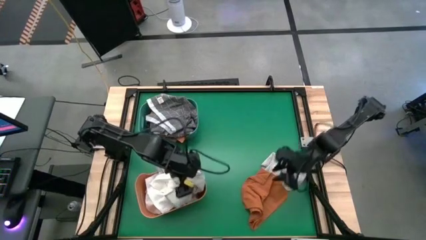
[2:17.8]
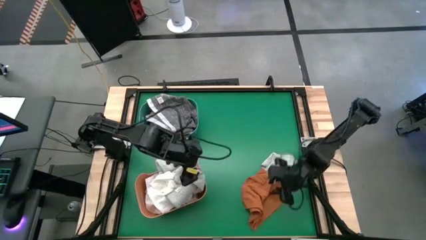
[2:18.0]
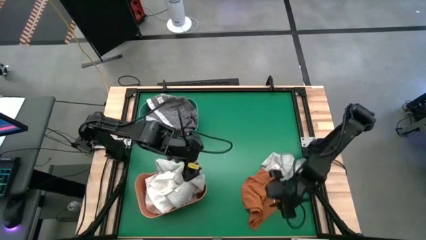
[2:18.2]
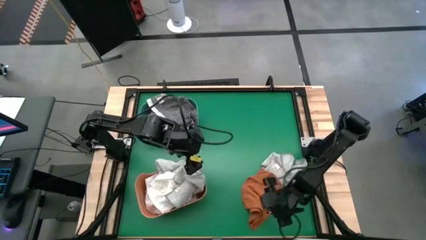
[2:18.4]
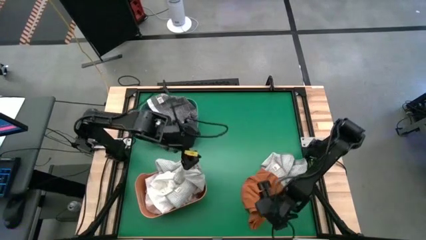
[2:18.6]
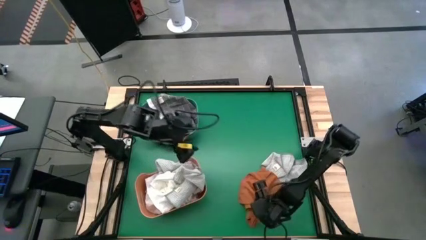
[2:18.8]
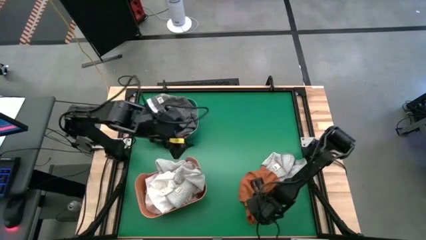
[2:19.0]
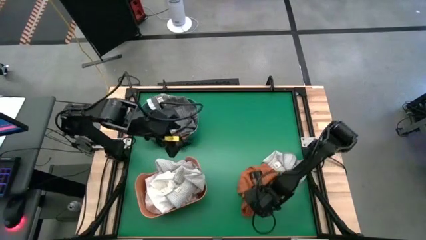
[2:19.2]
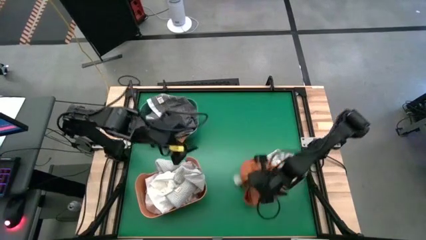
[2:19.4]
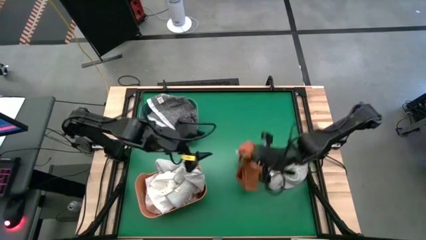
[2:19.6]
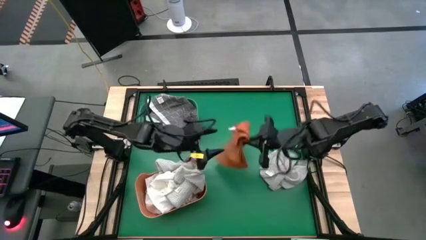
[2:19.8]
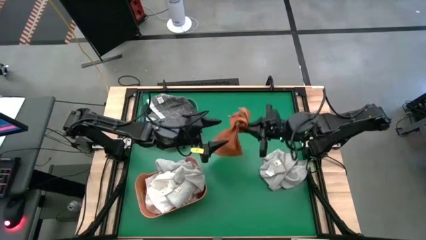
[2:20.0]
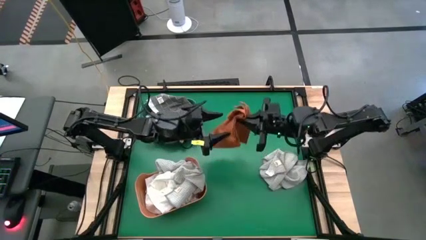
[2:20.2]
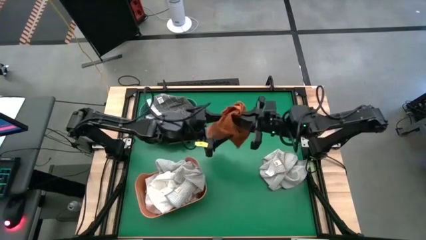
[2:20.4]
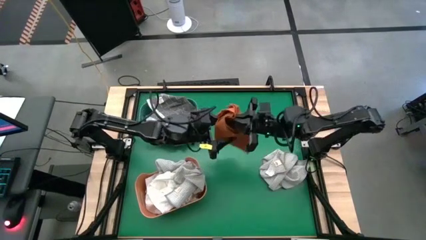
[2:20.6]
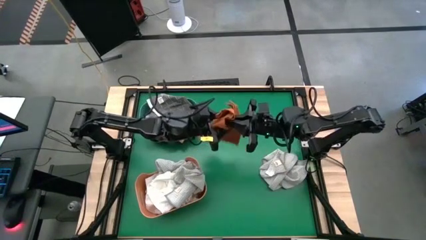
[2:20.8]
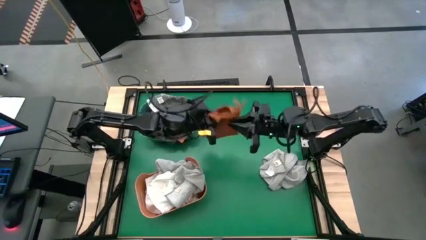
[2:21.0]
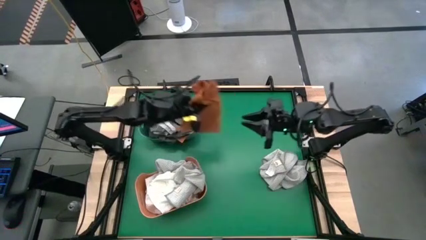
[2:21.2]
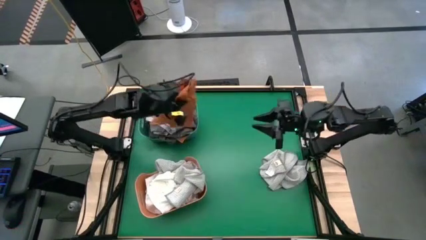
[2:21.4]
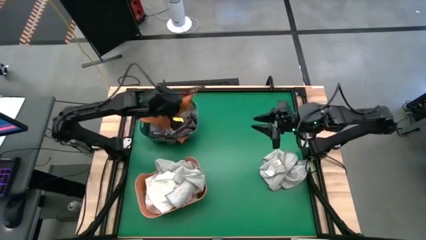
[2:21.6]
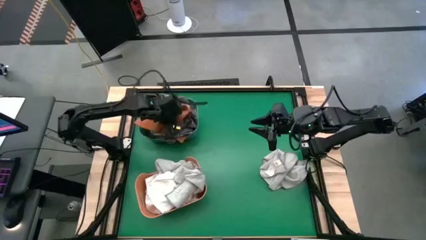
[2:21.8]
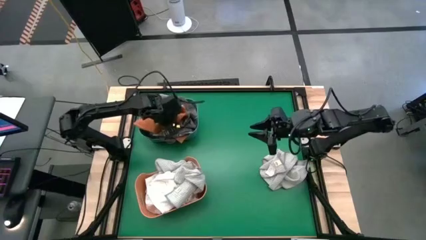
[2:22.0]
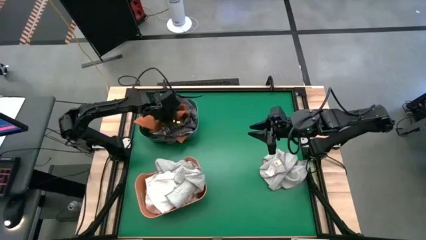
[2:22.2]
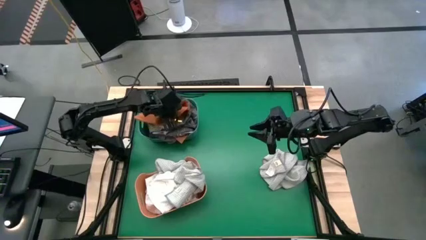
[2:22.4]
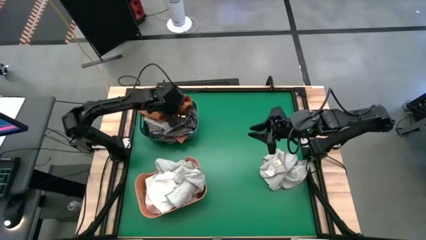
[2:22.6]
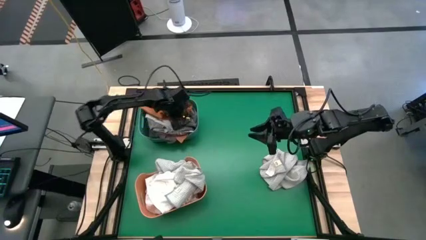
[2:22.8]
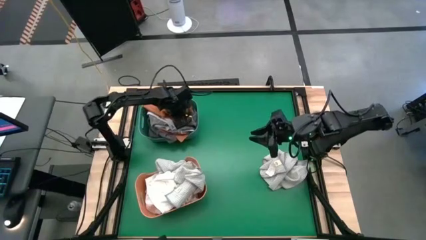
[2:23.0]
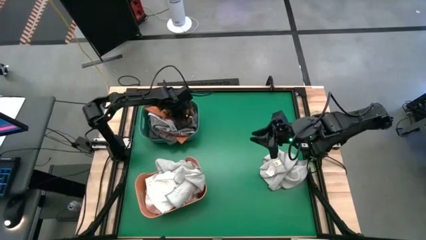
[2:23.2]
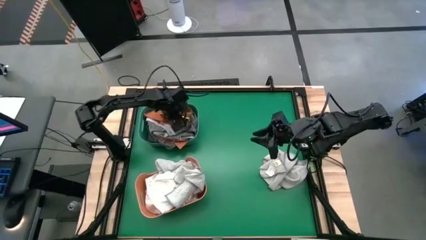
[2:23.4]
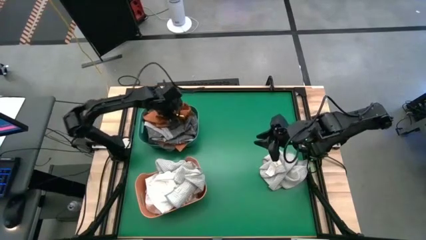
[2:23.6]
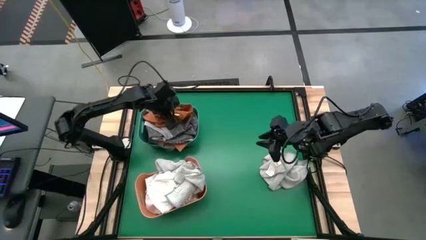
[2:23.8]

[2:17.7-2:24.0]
Task: Sort microfiber towel by color & place in baskets
Put the orange microfiber towel into the green bin

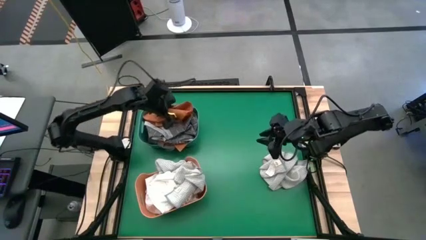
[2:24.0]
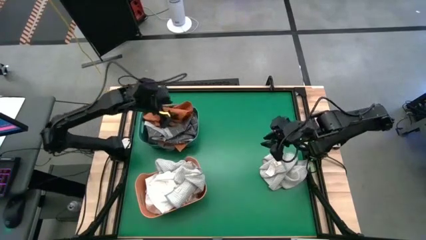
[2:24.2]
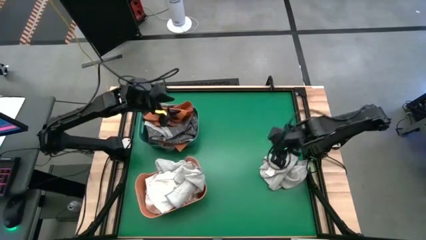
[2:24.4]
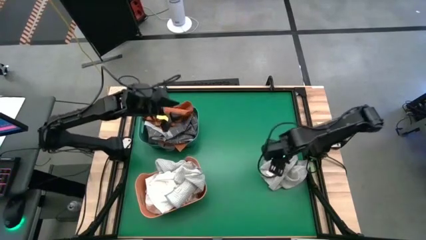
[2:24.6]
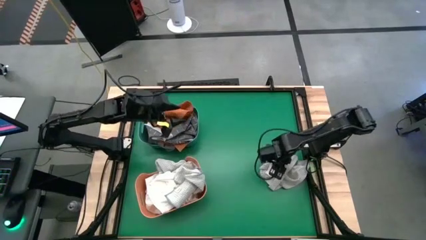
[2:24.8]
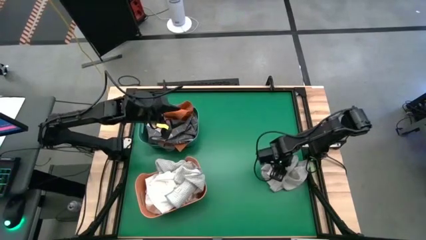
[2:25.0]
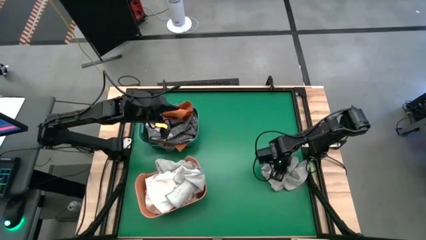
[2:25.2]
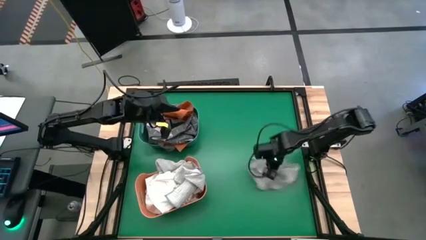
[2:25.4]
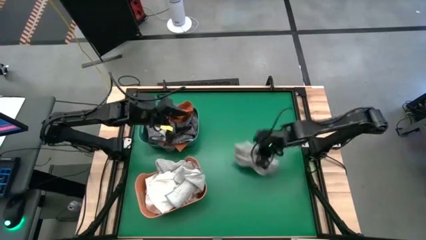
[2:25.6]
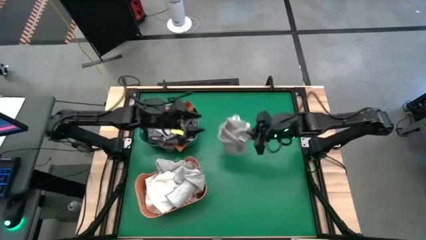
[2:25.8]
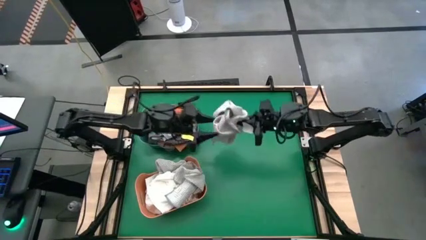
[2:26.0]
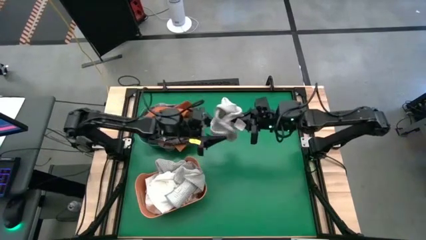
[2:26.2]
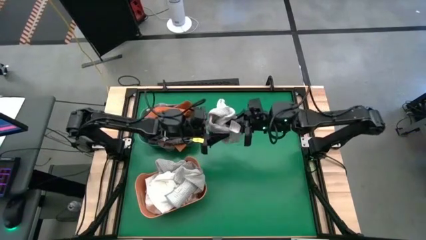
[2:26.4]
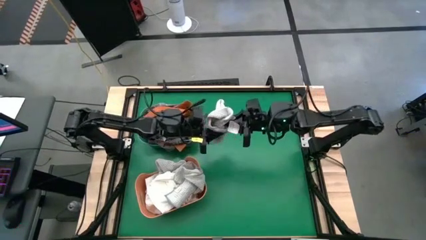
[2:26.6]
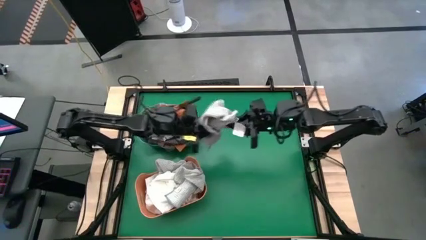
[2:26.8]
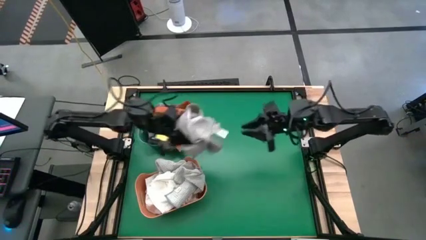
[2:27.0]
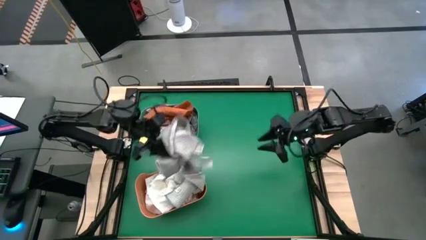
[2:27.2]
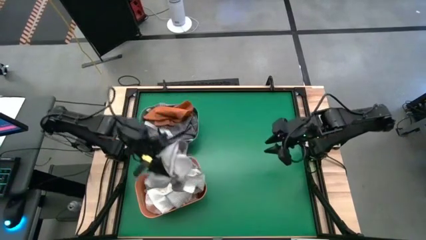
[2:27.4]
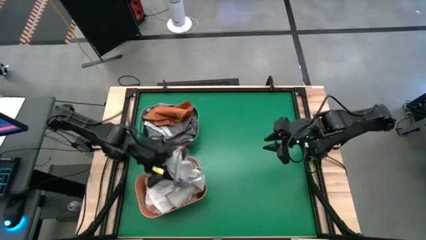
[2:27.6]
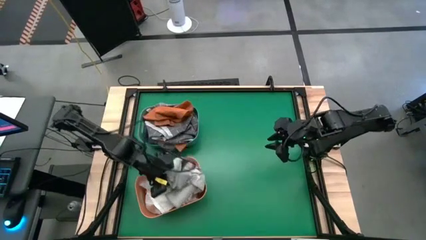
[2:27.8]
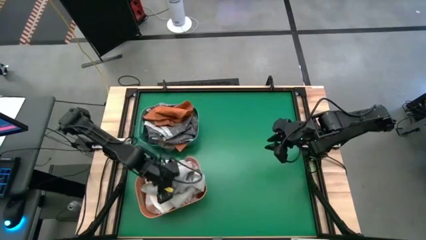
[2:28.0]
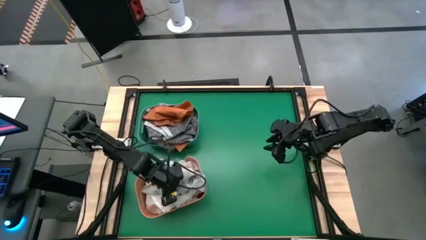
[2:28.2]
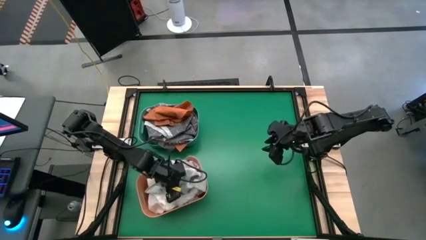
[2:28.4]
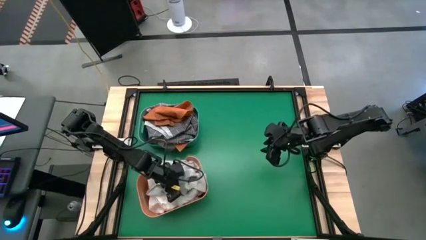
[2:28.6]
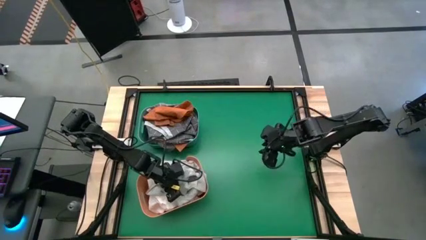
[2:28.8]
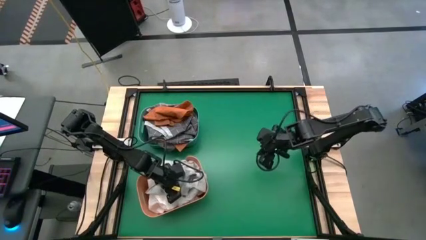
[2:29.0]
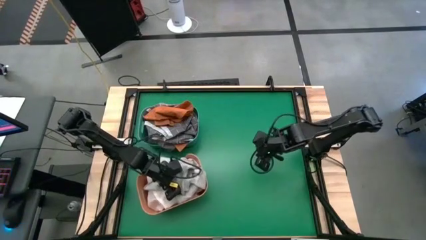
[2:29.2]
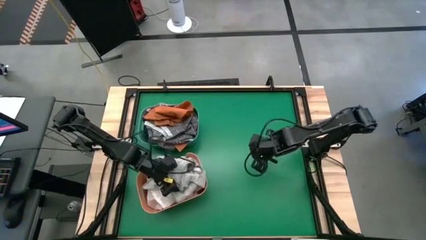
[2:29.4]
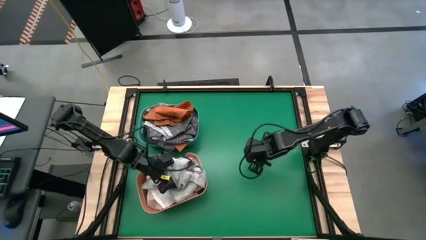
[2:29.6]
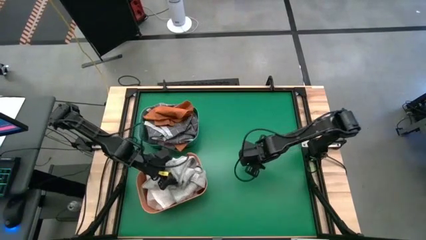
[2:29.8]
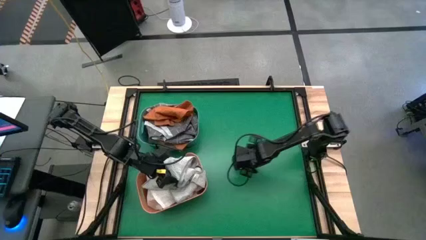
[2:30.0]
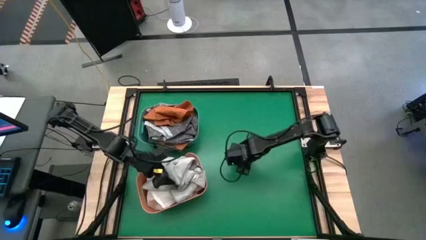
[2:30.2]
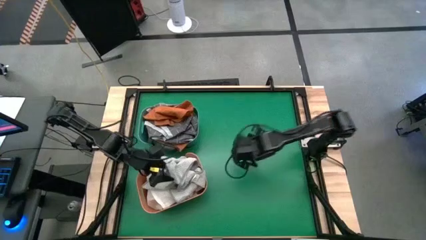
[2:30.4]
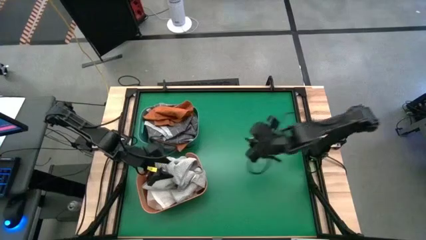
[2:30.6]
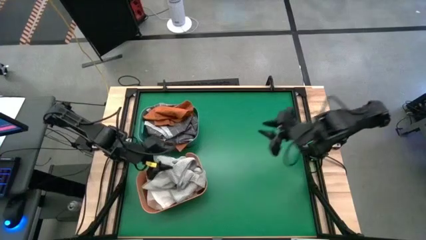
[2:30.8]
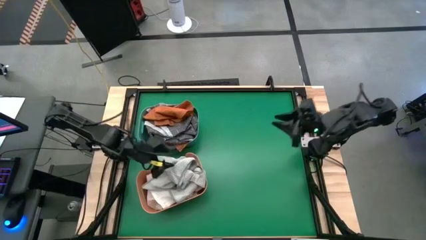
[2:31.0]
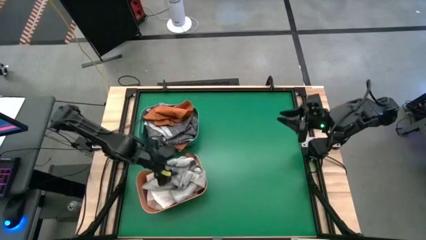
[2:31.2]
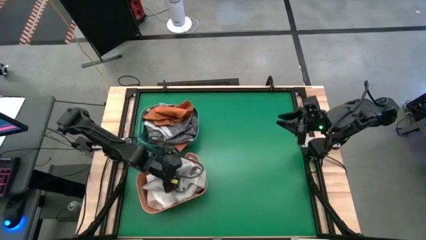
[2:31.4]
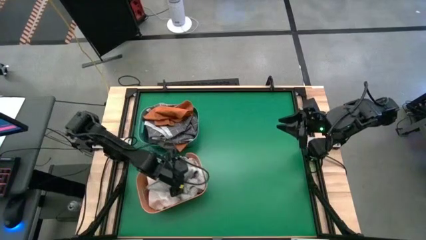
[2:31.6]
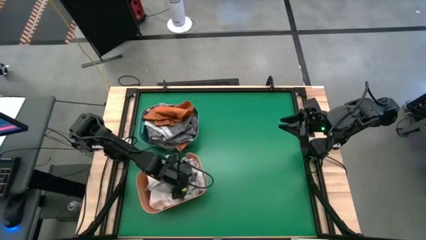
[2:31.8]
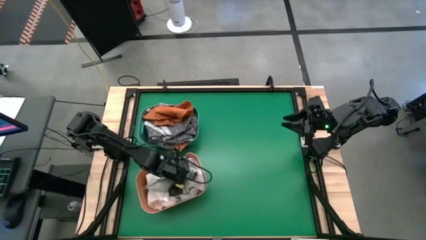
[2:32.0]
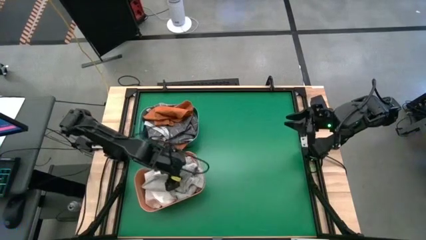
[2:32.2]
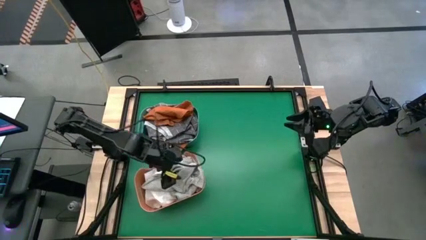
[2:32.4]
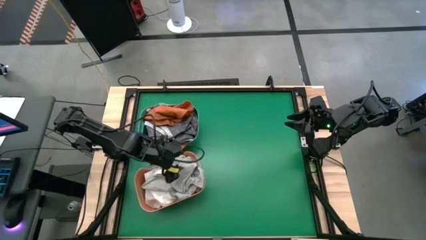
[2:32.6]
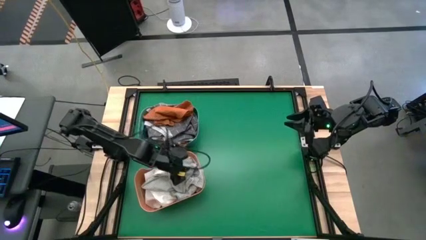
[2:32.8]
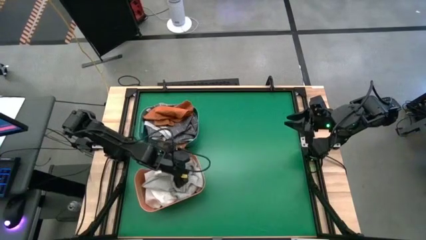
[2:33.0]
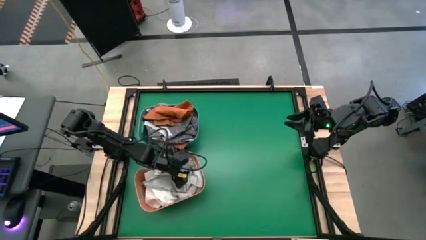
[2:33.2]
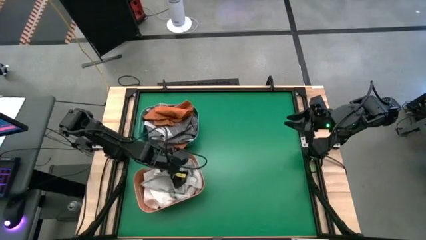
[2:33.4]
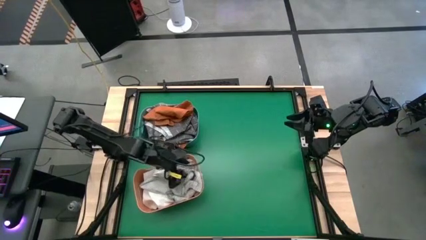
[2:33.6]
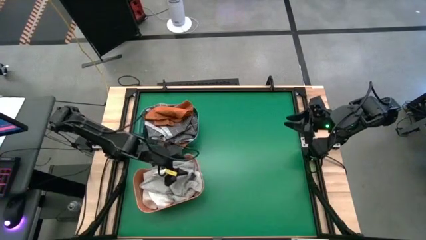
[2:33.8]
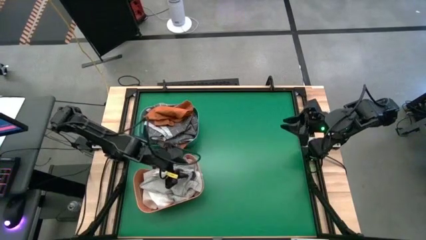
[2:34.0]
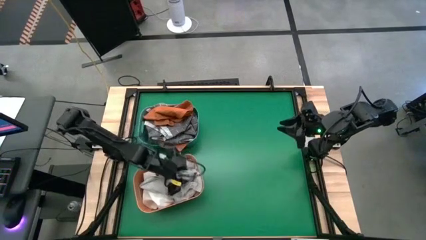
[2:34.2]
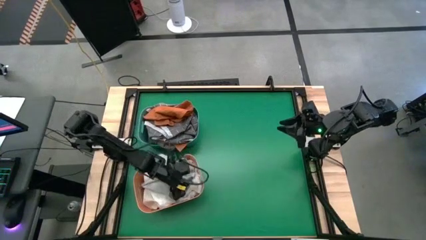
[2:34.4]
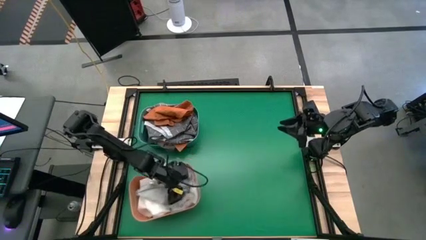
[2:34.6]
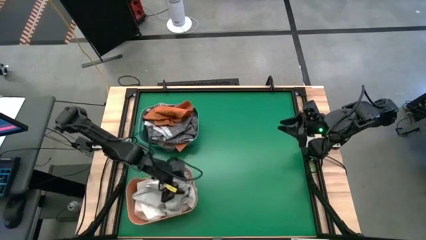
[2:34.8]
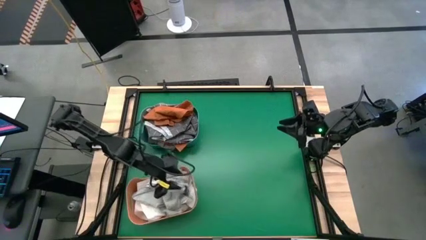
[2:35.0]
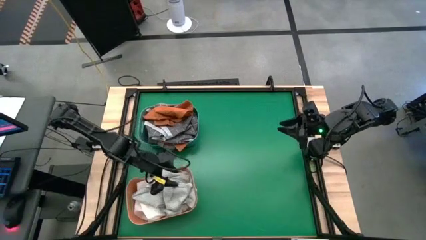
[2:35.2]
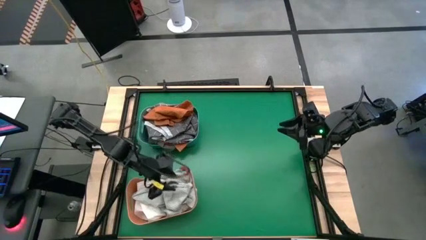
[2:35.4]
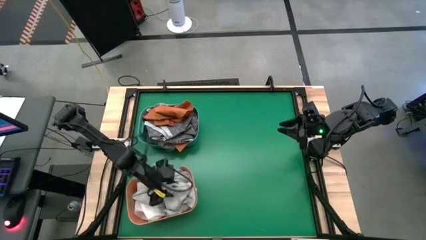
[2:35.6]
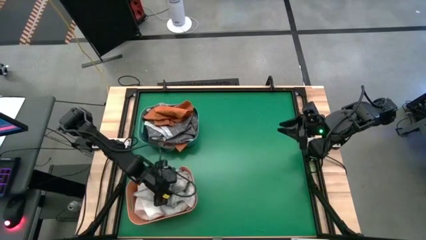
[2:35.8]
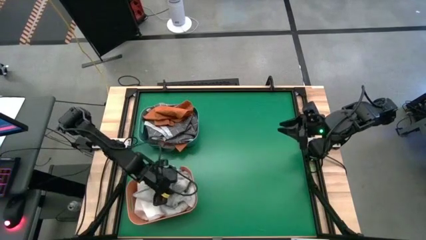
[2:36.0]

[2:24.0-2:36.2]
Put the gray microfiber towel into the orange bin
